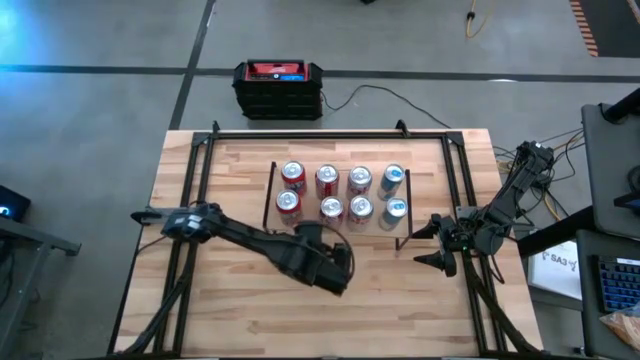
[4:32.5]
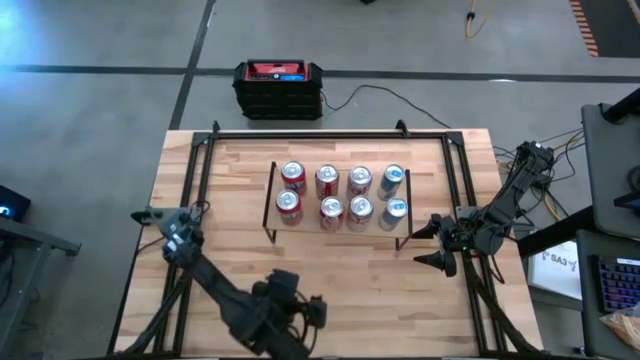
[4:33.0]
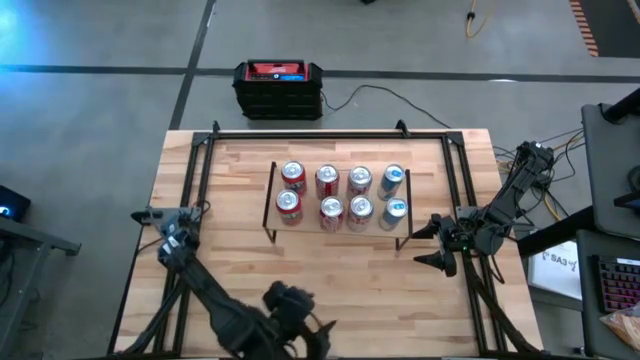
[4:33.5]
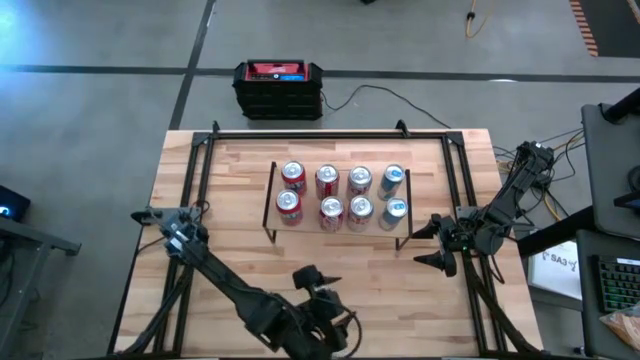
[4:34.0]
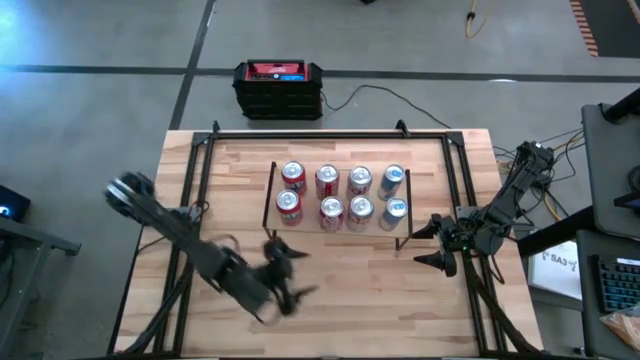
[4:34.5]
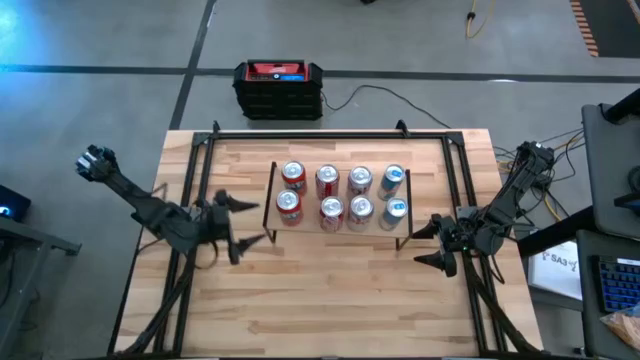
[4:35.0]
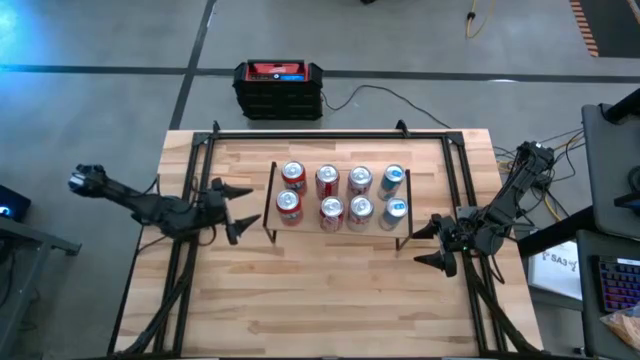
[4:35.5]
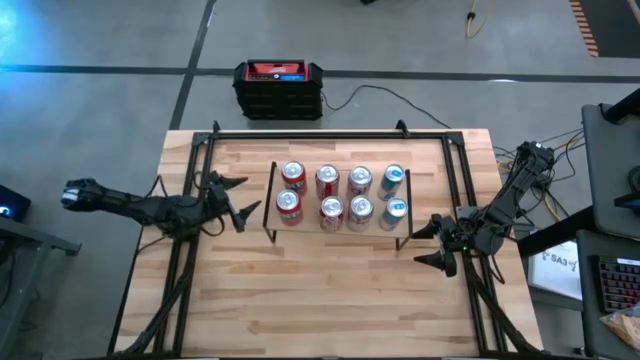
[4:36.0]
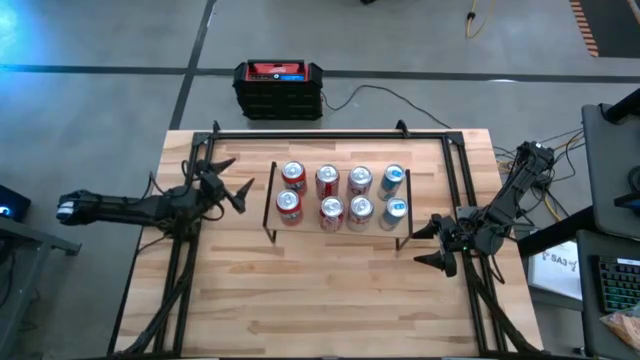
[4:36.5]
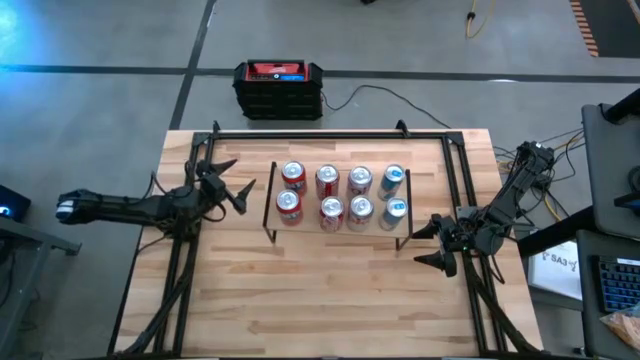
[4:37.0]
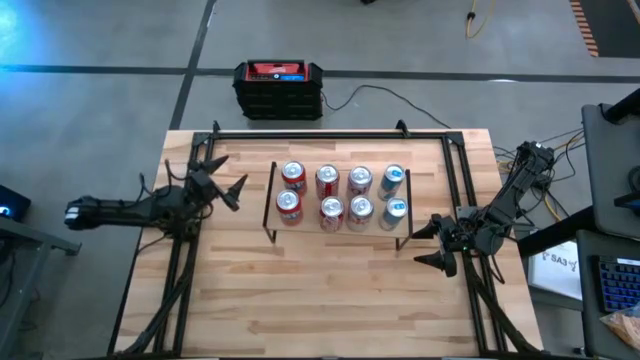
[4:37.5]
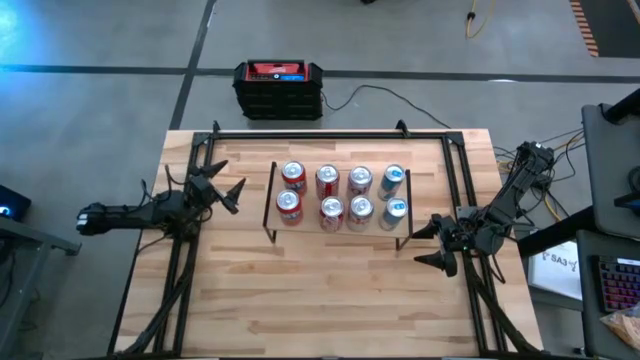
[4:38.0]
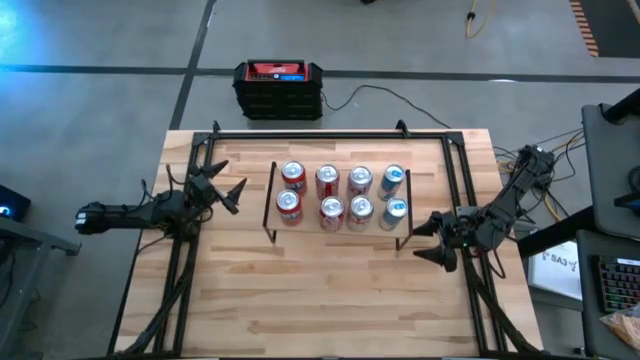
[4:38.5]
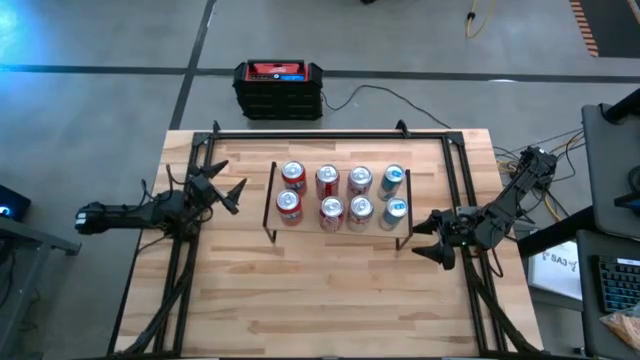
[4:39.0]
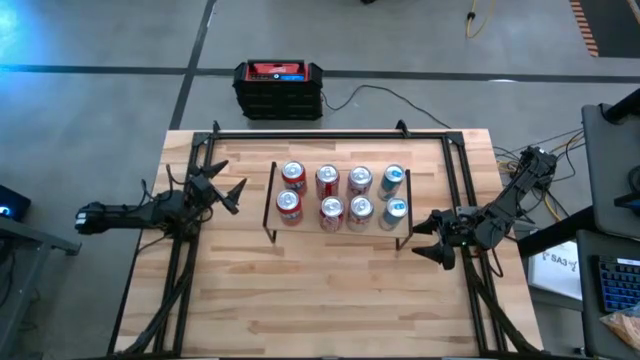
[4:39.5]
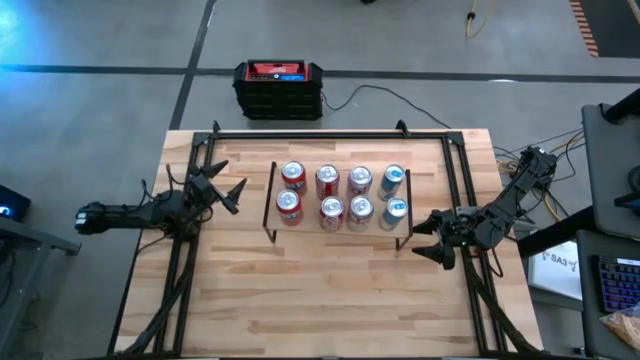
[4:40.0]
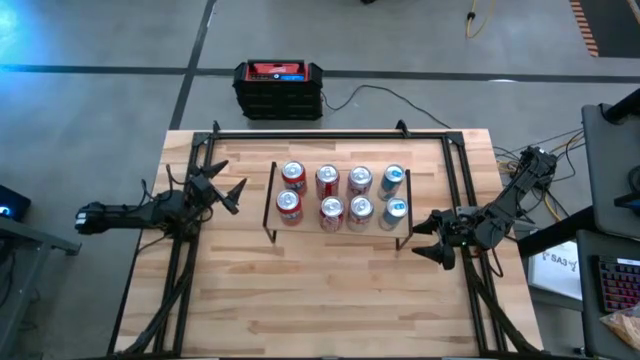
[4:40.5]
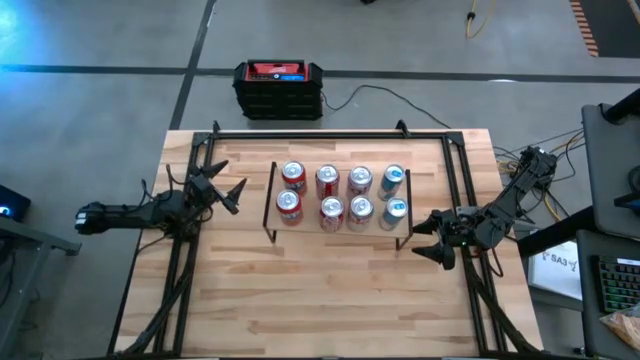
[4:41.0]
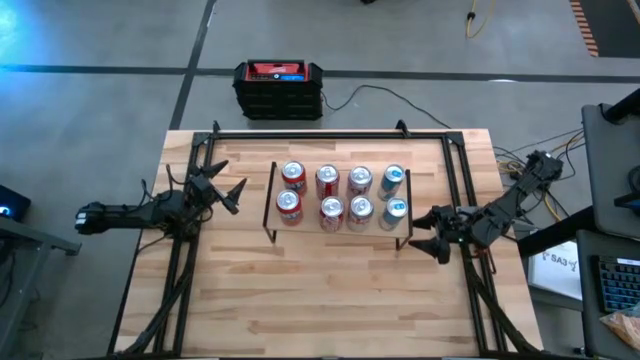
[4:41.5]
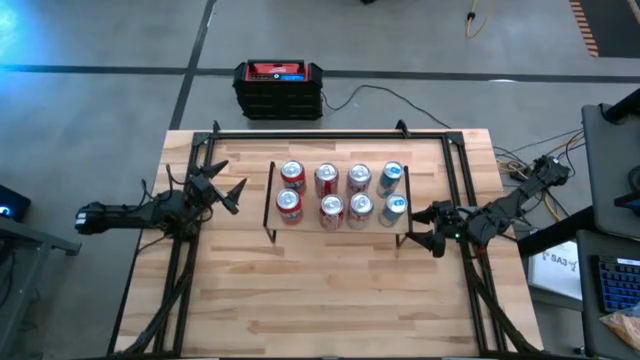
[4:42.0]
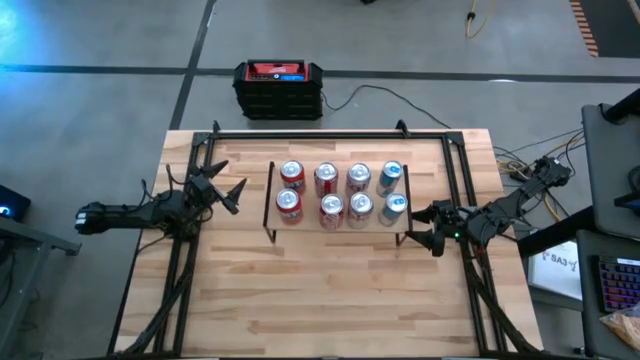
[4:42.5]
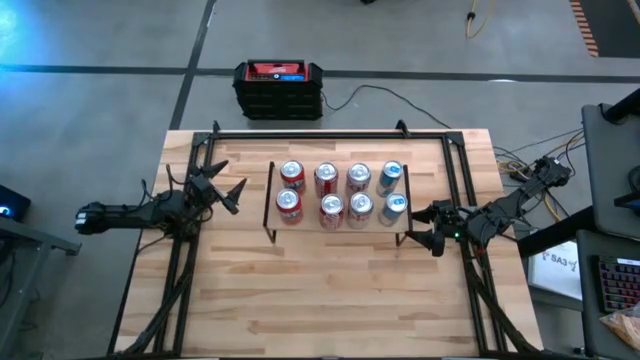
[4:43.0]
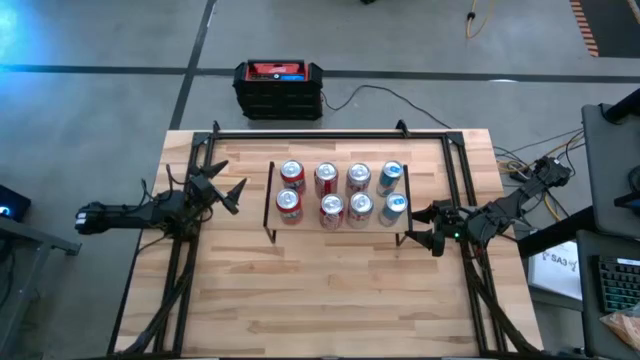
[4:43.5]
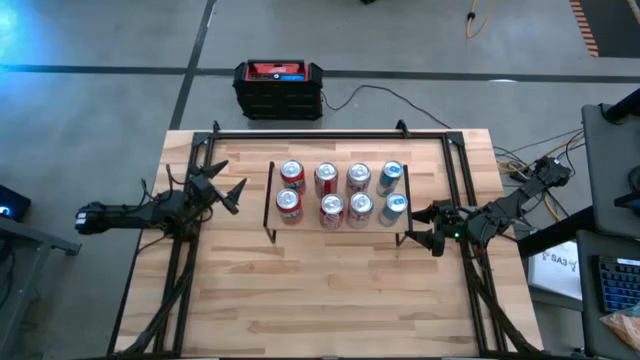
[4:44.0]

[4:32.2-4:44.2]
Task: Place canned beverage on shelf
Return to Home Position

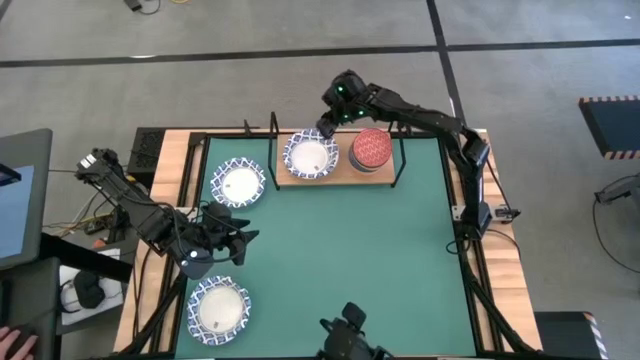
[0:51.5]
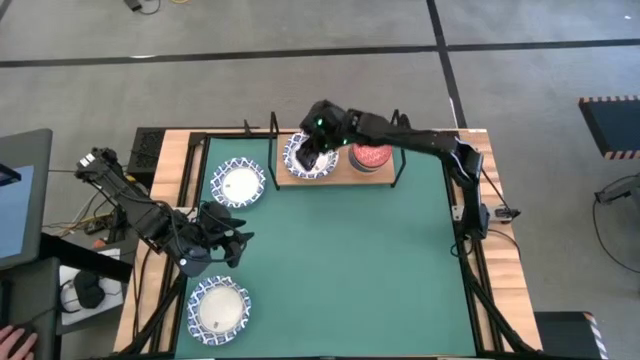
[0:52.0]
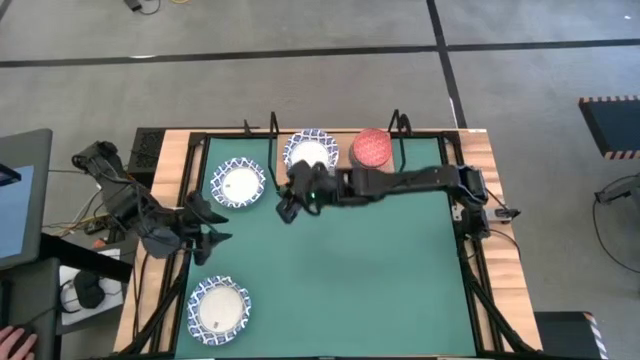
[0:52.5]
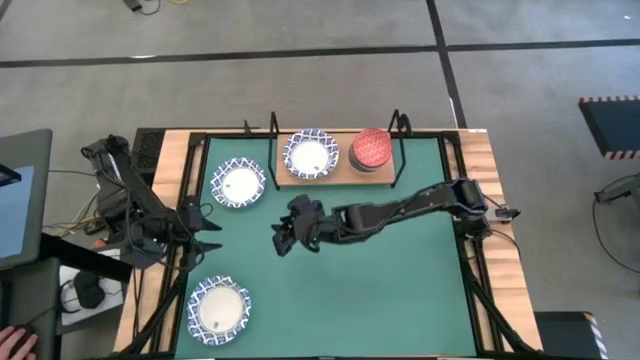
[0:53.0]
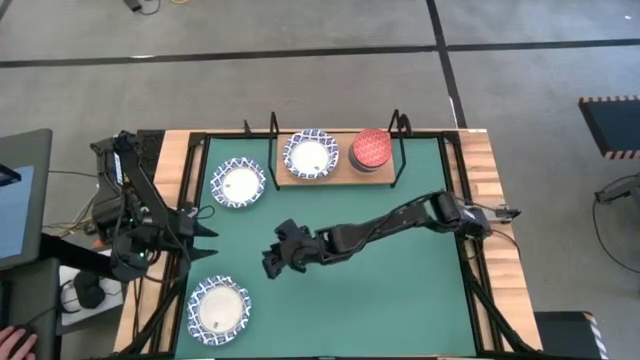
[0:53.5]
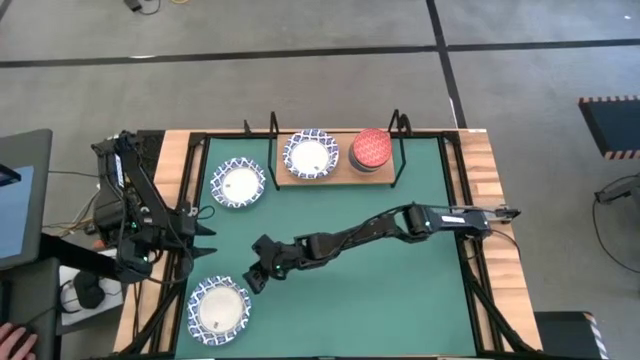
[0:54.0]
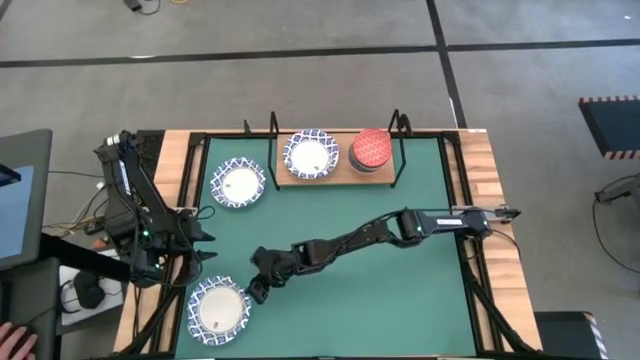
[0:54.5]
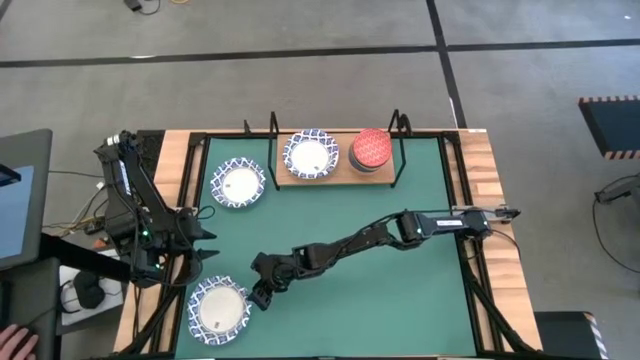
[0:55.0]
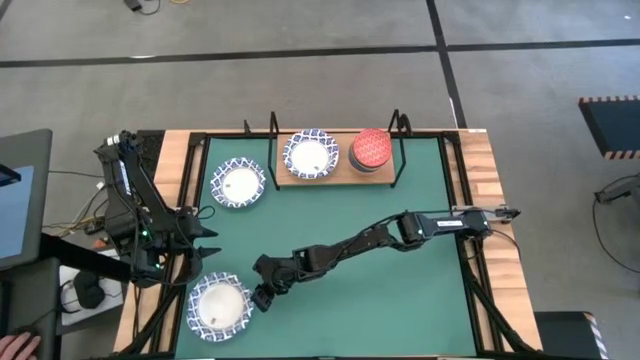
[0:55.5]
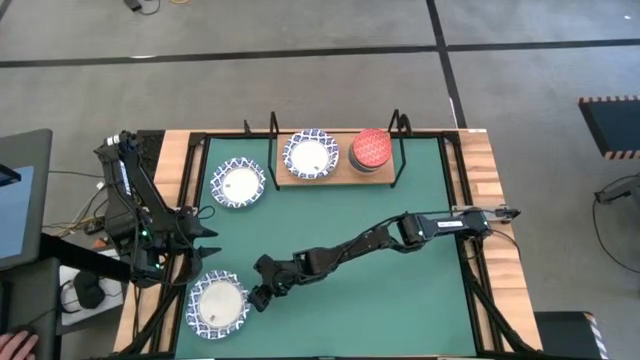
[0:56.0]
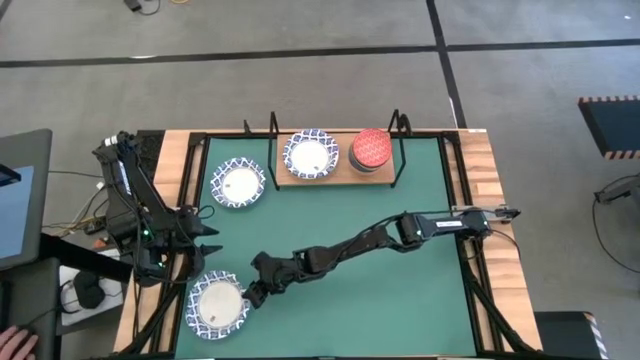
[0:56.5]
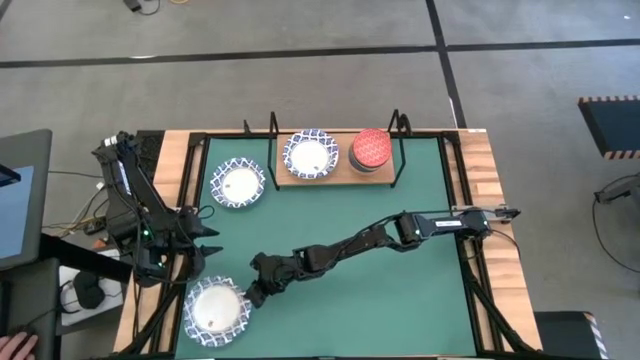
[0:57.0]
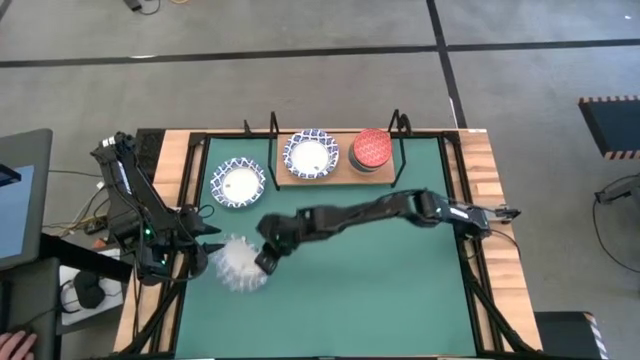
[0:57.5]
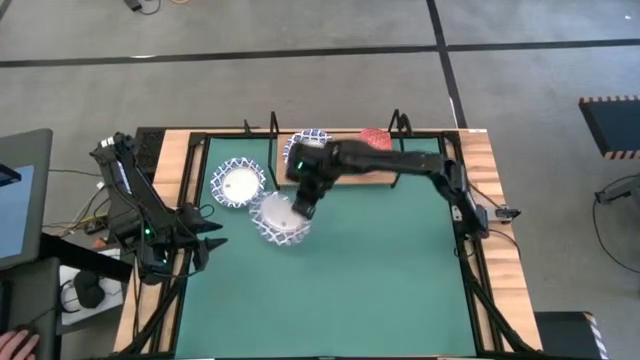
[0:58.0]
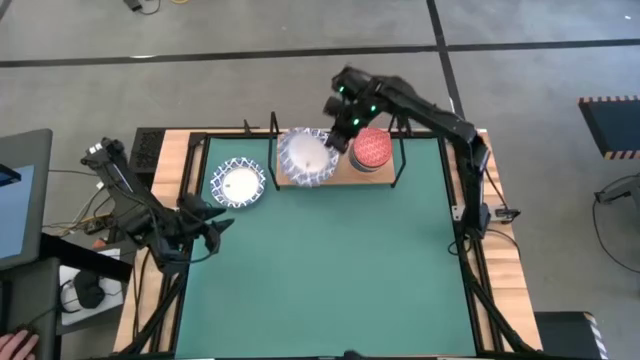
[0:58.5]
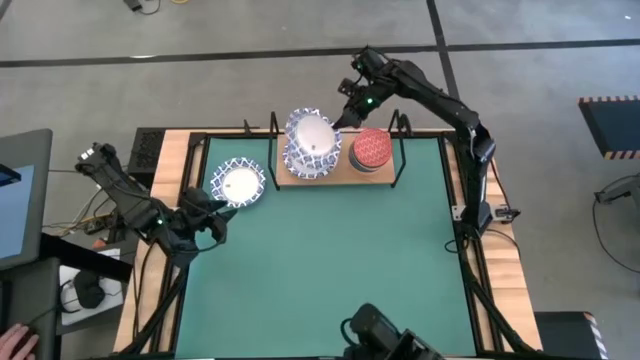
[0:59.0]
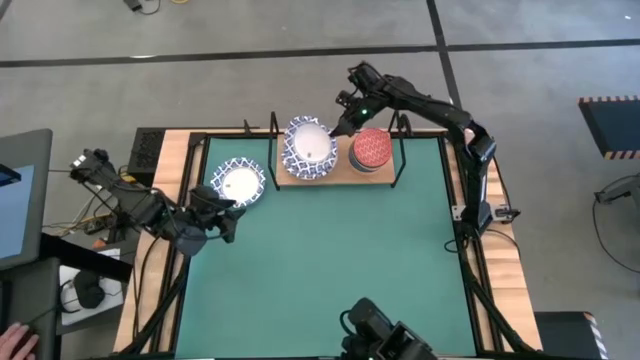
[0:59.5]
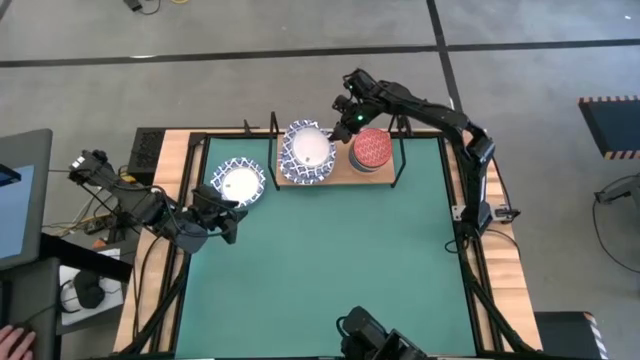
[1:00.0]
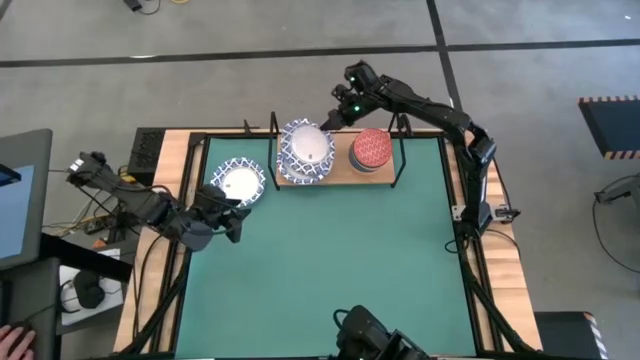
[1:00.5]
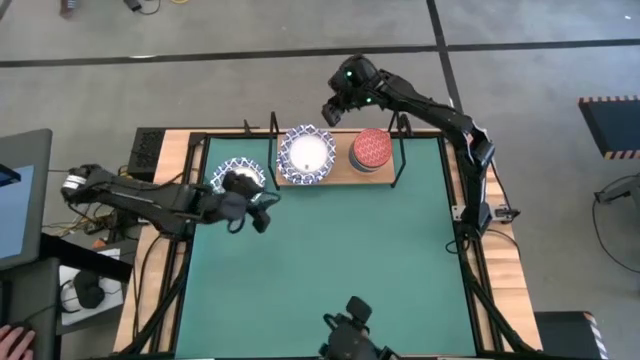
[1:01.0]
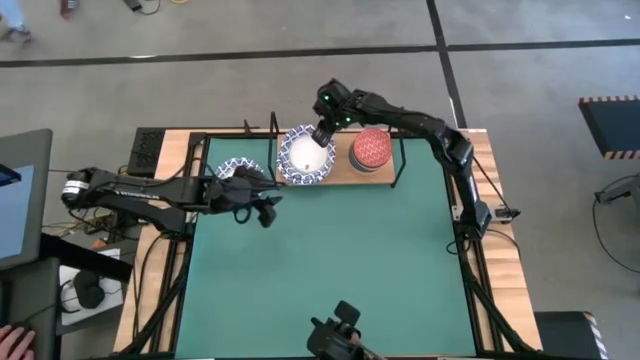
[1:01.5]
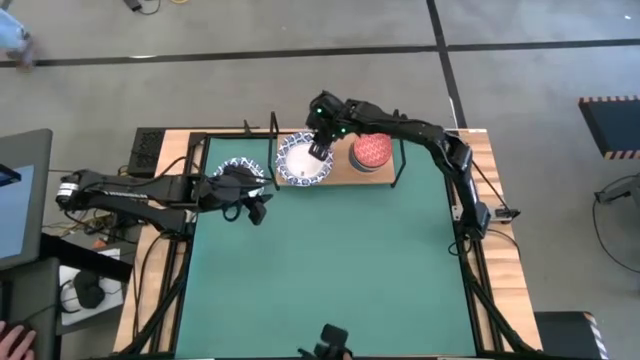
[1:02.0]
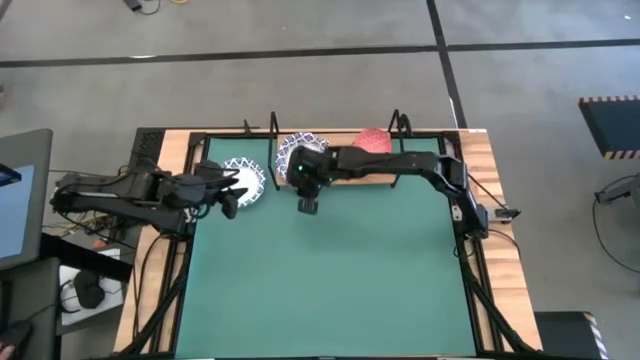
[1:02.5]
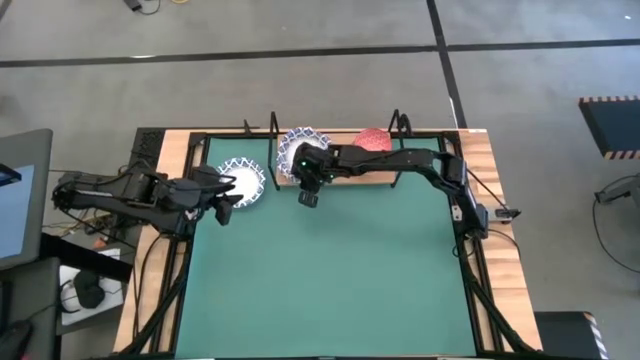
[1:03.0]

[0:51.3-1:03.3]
Task: Place and stack bowls onto a shelf
Stack the bottom white-blue paper bowl on top of the white-blue paper bowl on the shelf
